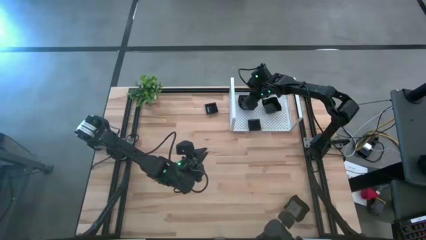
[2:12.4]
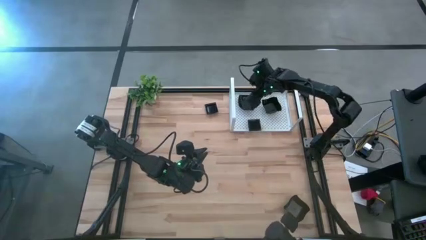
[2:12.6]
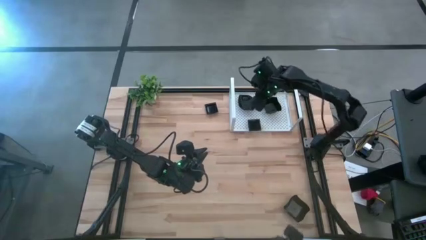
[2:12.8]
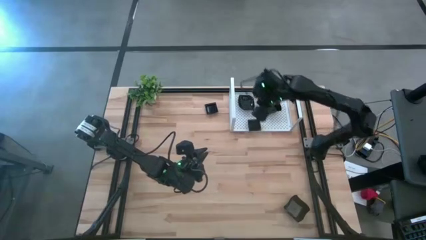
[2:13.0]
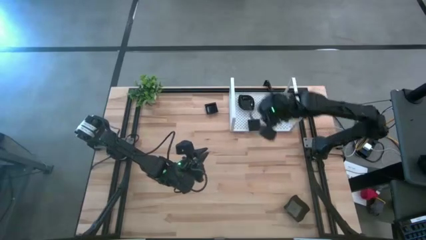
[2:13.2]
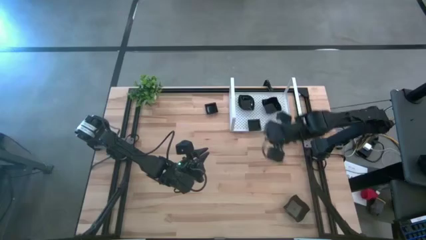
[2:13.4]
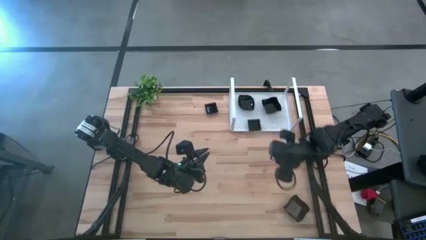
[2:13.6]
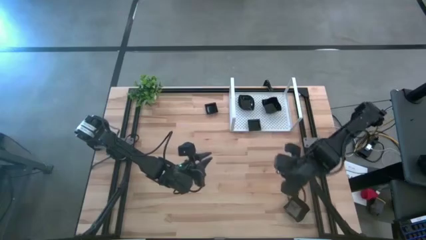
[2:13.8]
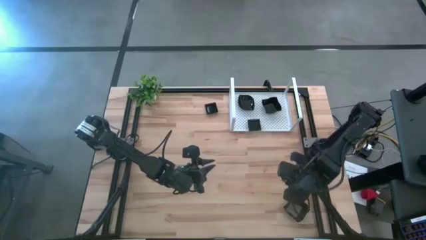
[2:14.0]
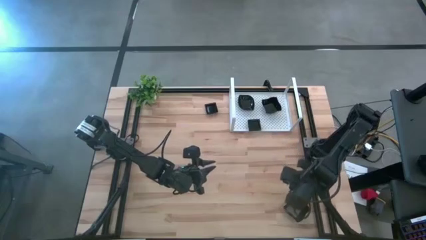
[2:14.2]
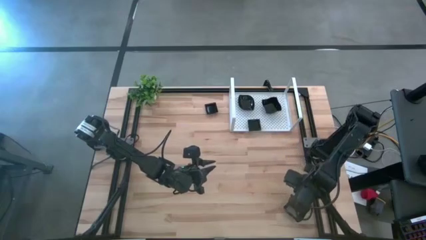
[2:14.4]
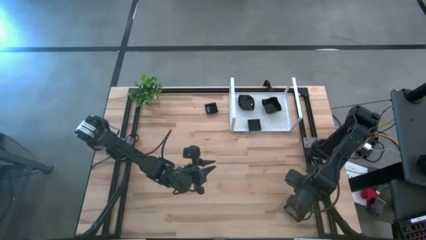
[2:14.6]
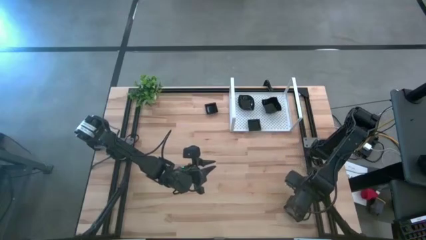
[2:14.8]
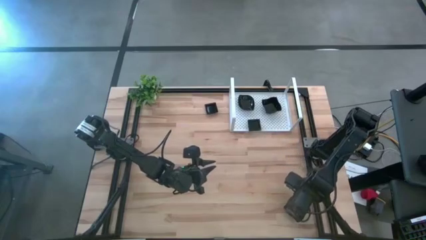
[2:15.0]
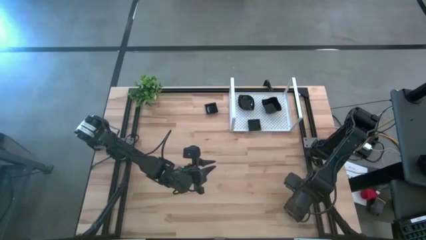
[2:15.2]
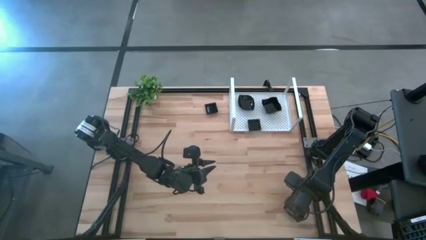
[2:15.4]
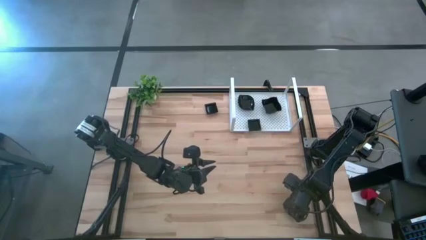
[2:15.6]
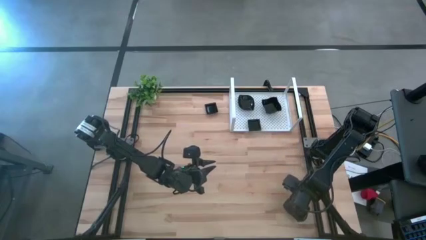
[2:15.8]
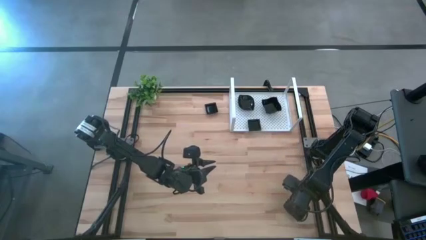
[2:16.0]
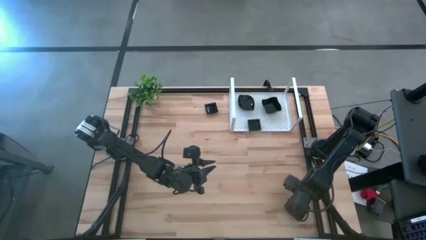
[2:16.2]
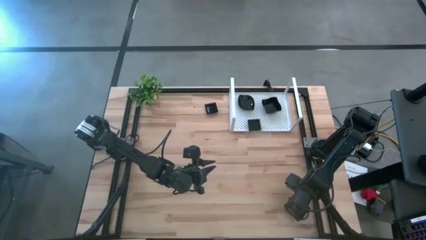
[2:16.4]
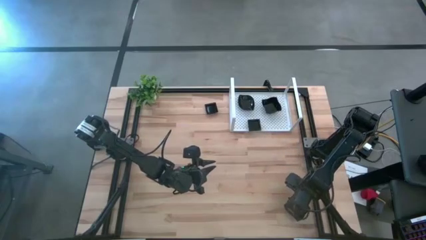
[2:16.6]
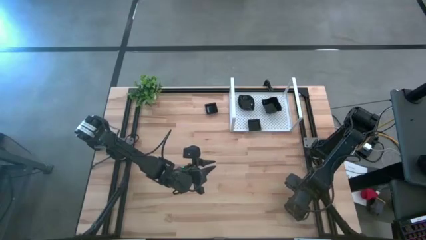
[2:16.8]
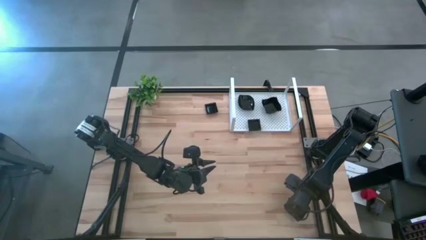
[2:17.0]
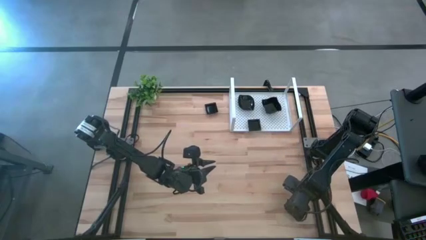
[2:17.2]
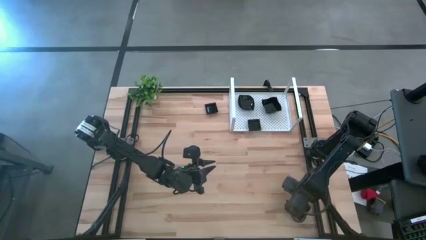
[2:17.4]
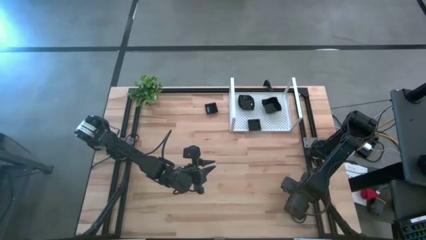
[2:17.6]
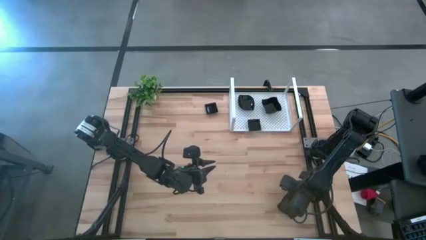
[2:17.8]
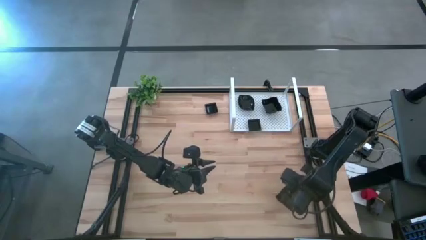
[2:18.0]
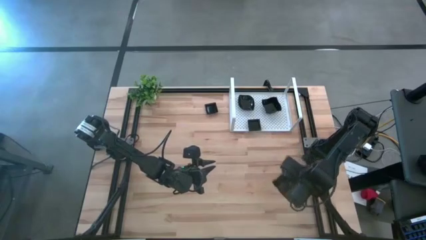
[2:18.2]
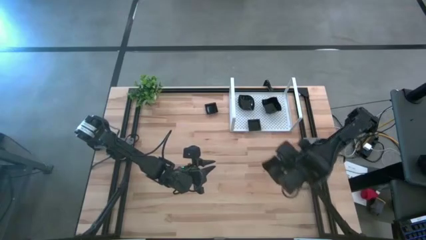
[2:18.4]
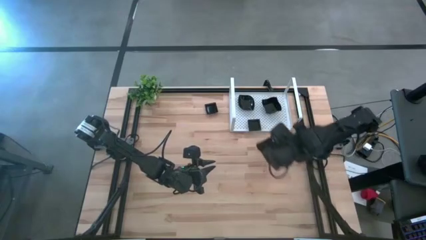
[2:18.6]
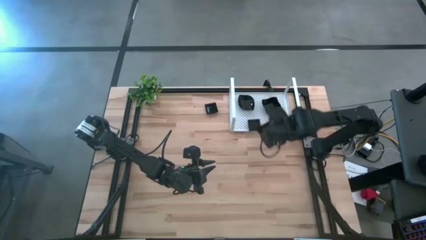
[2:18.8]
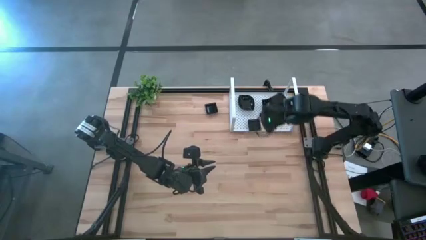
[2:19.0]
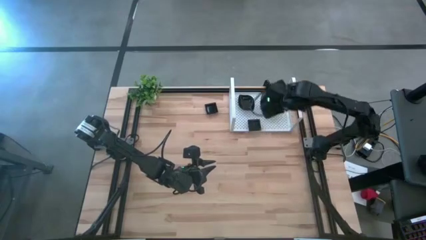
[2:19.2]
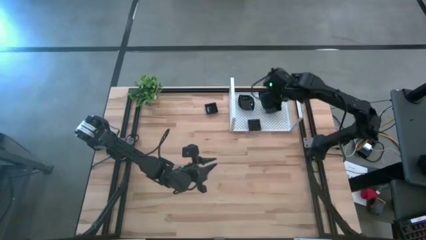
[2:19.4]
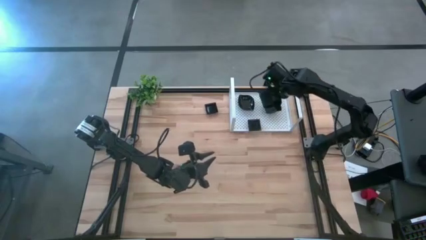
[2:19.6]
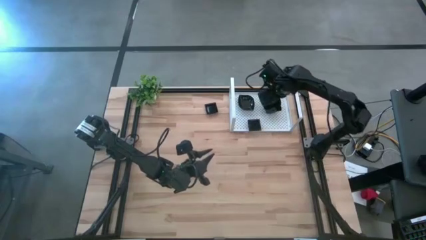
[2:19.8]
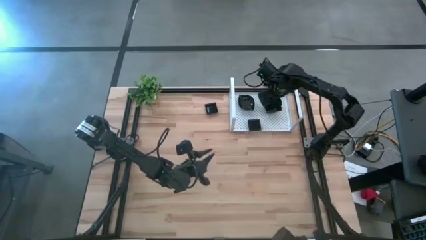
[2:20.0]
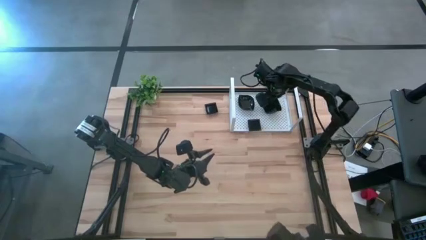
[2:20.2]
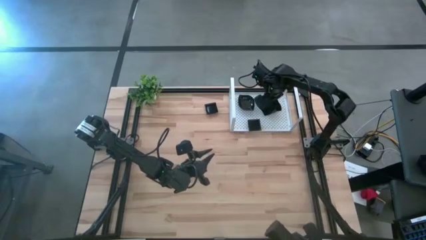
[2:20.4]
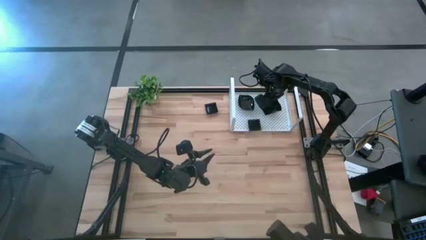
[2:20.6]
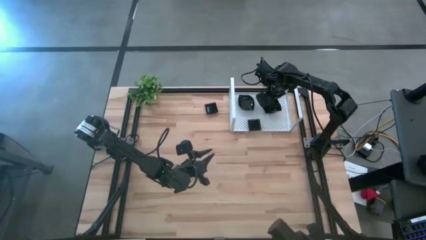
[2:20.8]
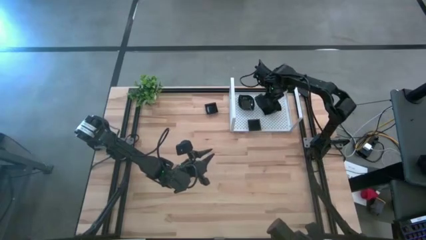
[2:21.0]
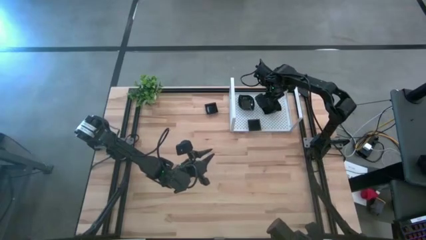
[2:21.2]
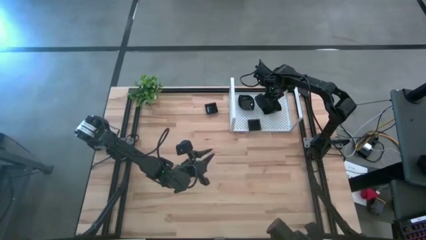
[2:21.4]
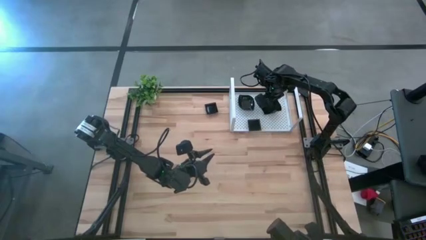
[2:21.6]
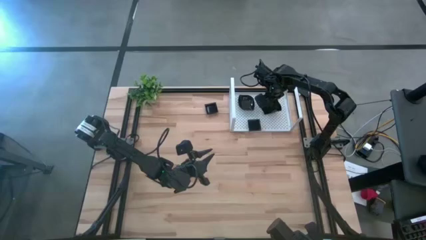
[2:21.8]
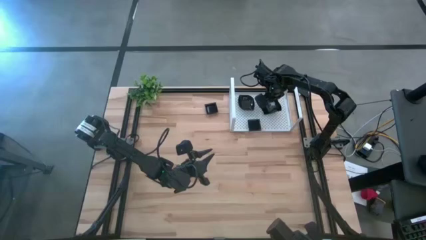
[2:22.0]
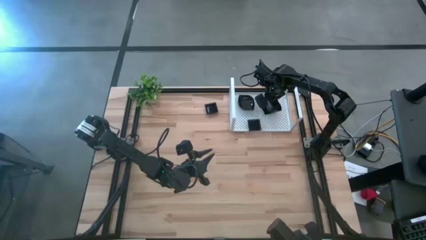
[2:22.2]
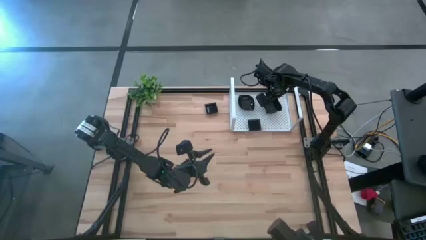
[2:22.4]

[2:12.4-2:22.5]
Task: Pick & Place Mini shaped plates
Stack the distorted square plate on top of the other distorted square plates on the shelf

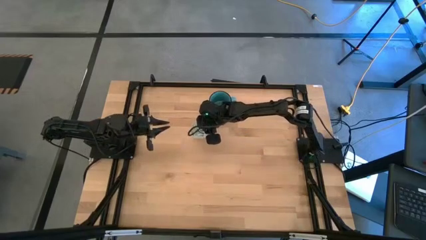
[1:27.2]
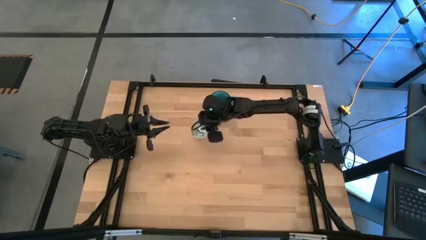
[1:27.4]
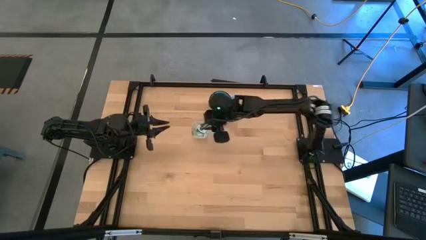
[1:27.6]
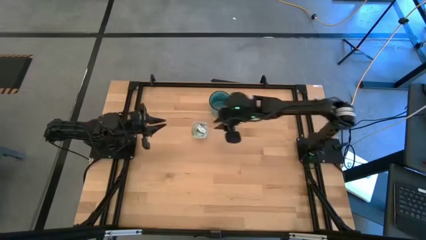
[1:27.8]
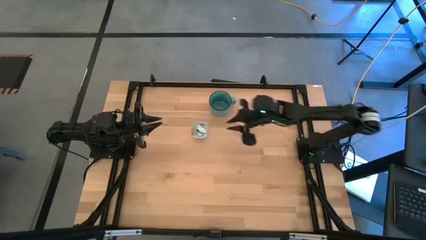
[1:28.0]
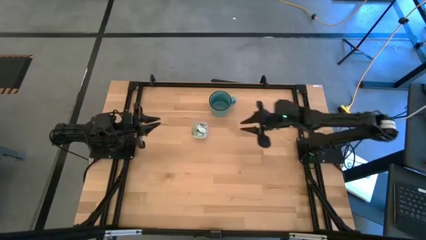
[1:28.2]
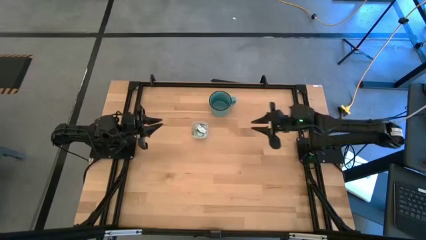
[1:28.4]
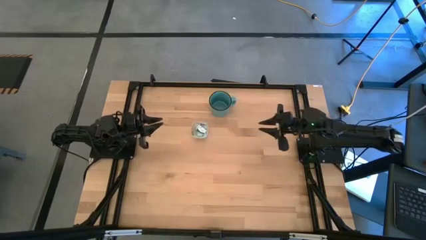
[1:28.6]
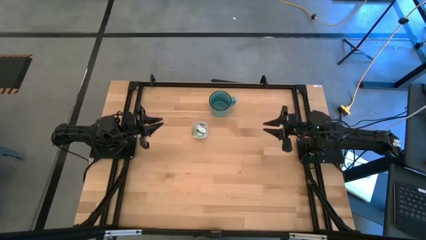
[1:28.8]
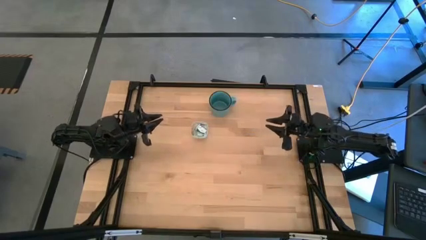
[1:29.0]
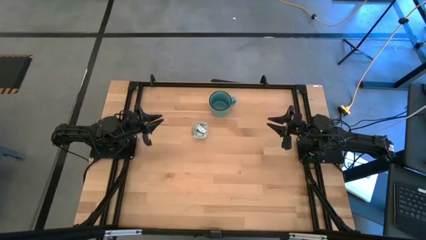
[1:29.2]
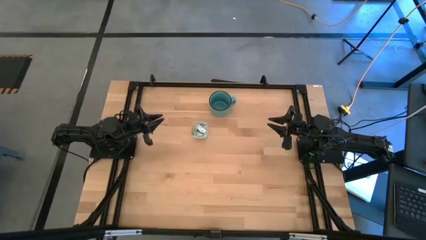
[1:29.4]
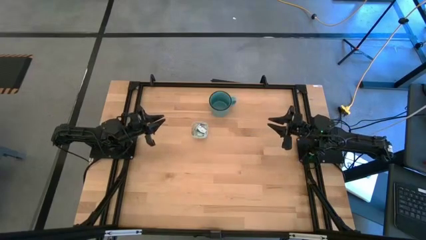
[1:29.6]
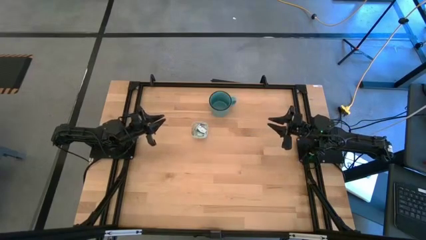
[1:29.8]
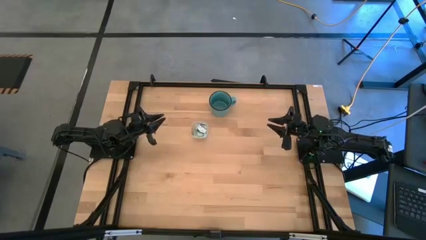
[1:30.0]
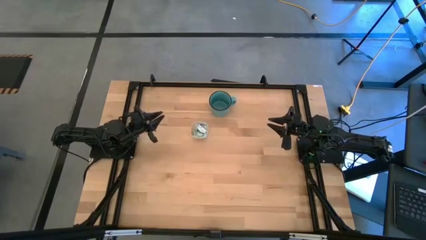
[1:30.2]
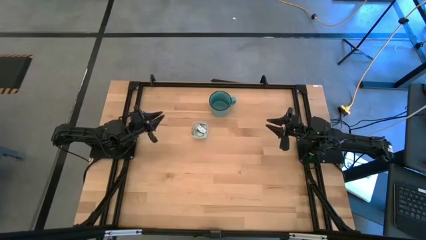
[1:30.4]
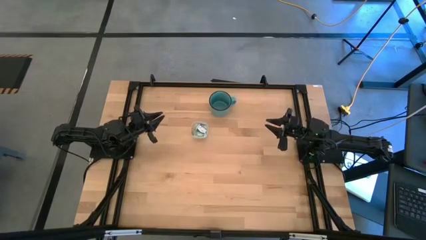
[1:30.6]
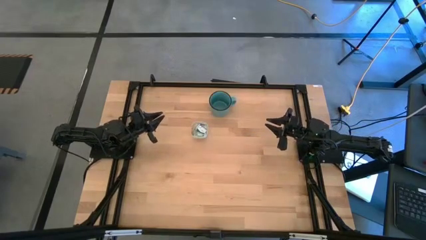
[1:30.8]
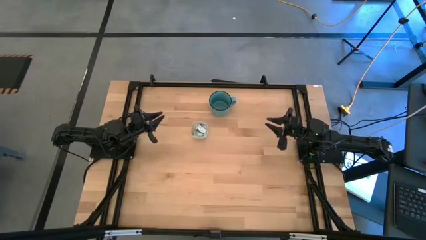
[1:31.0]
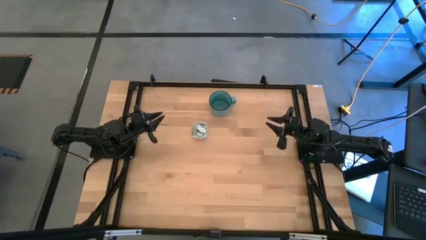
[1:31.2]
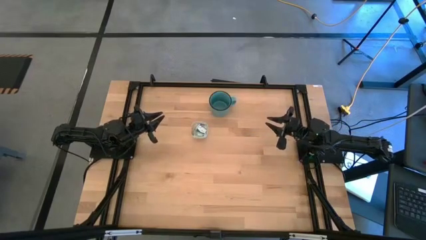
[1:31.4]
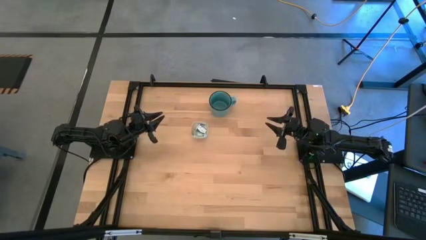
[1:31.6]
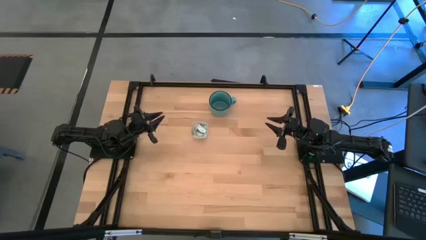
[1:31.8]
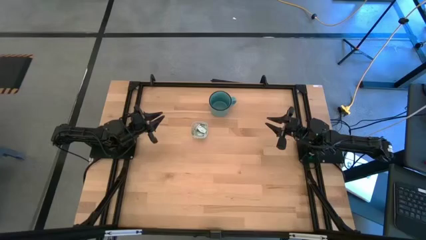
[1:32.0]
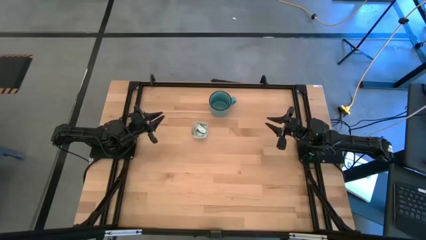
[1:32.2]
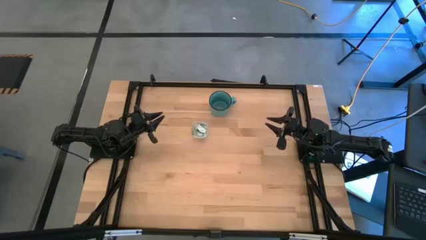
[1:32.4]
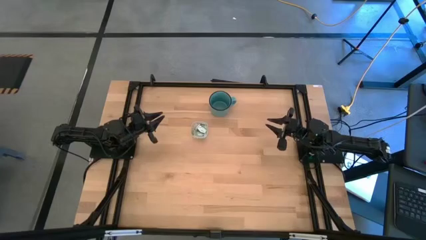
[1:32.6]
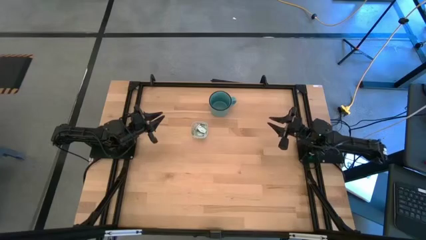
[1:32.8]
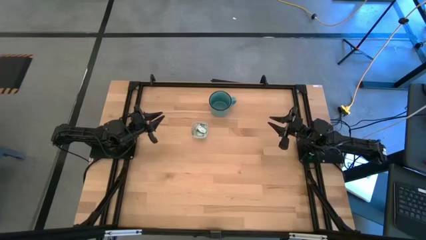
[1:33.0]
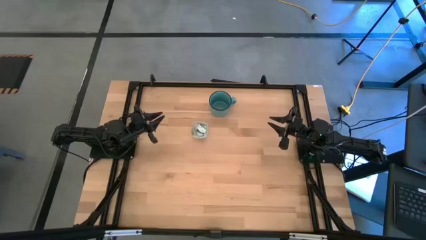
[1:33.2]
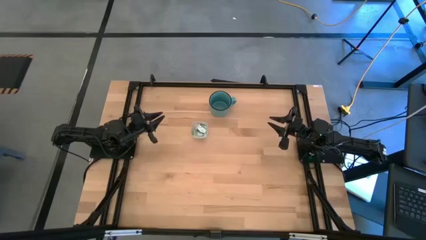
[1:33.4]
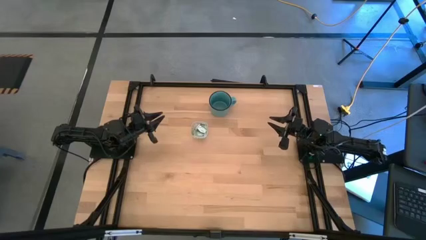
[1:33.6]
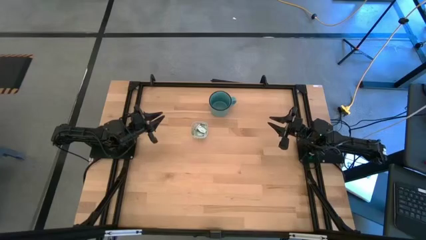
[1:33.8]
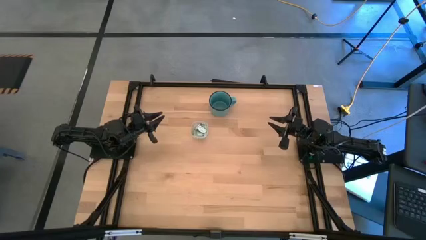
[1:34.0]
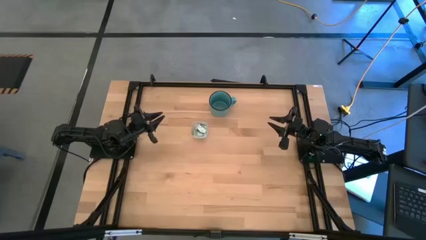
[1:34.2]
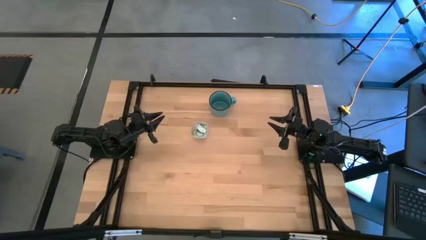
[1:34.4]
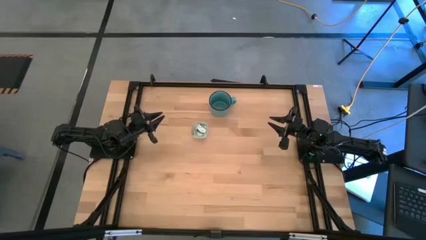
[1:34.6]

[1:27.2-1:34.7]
Task: Pick and place Stevia / Truvia into bins
Return to Home Position
